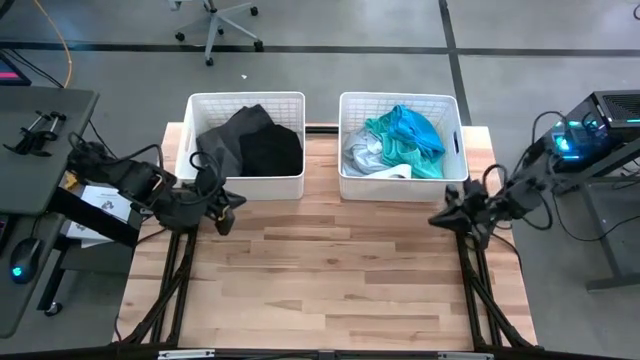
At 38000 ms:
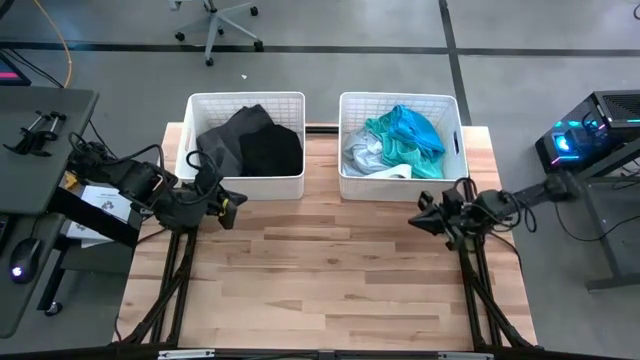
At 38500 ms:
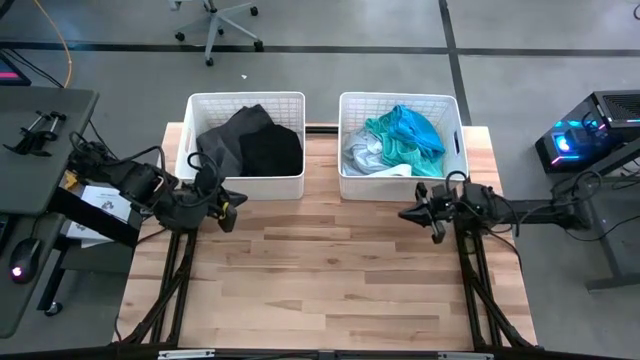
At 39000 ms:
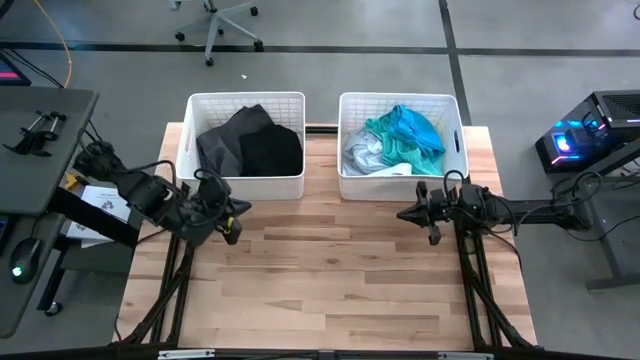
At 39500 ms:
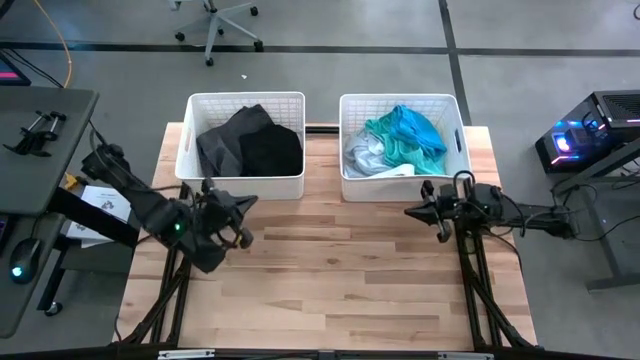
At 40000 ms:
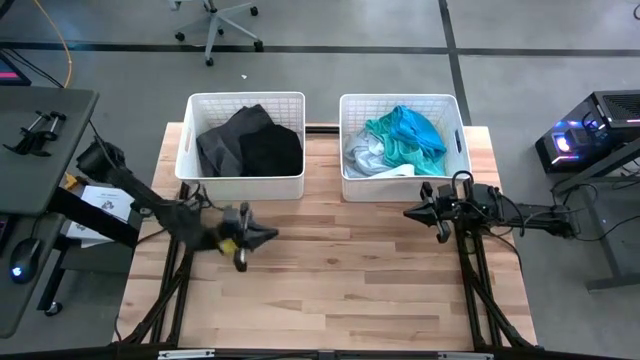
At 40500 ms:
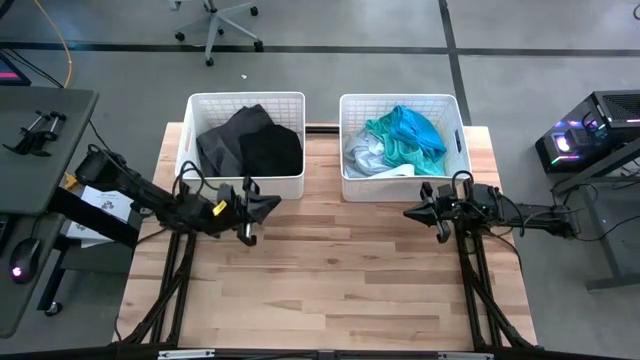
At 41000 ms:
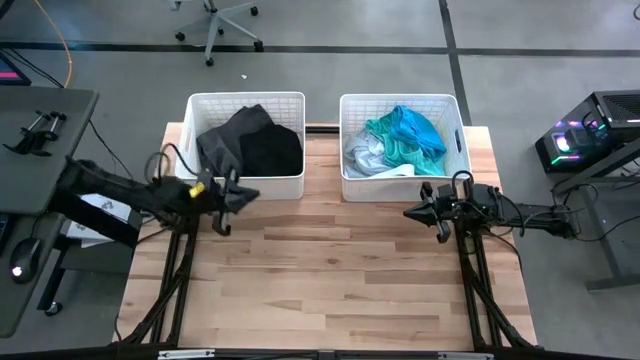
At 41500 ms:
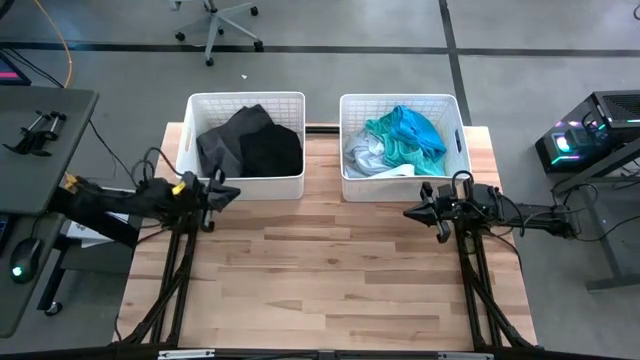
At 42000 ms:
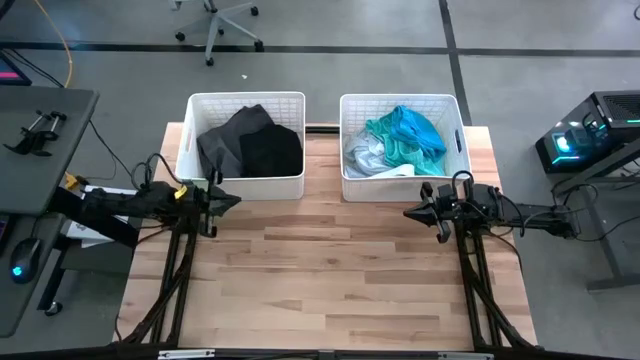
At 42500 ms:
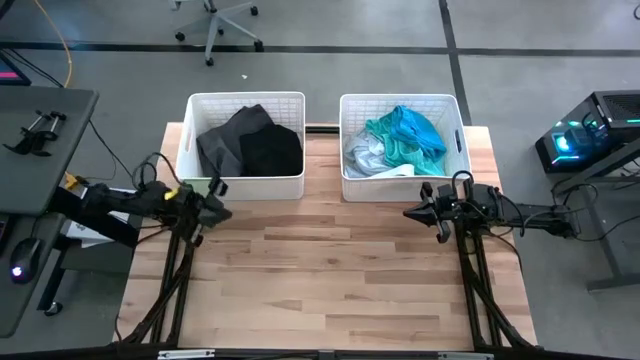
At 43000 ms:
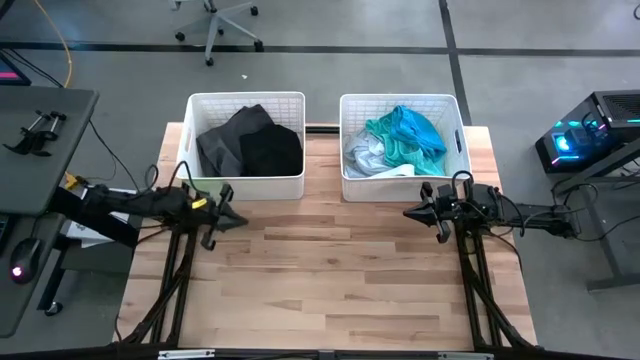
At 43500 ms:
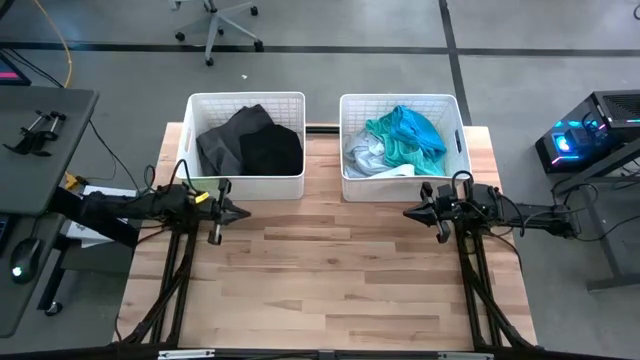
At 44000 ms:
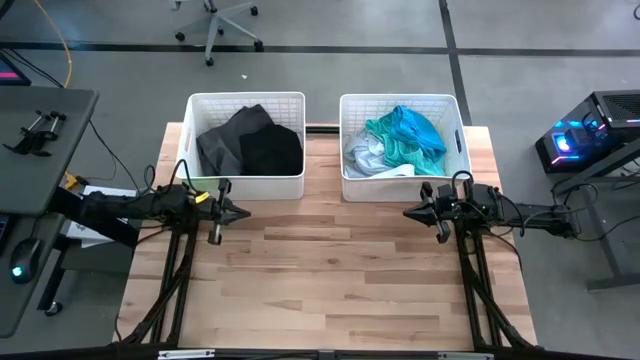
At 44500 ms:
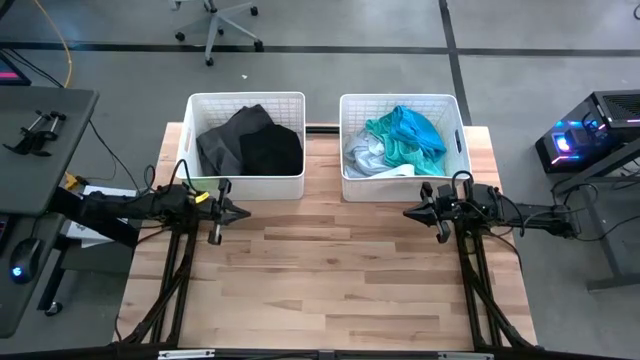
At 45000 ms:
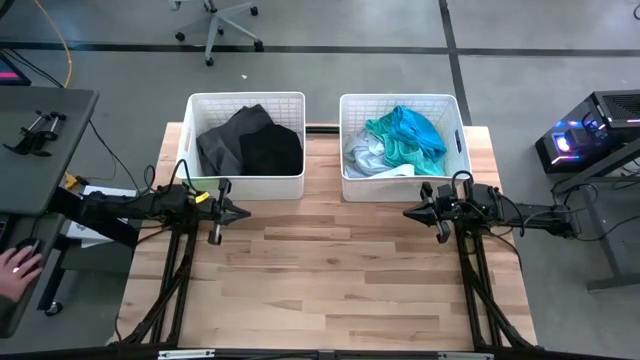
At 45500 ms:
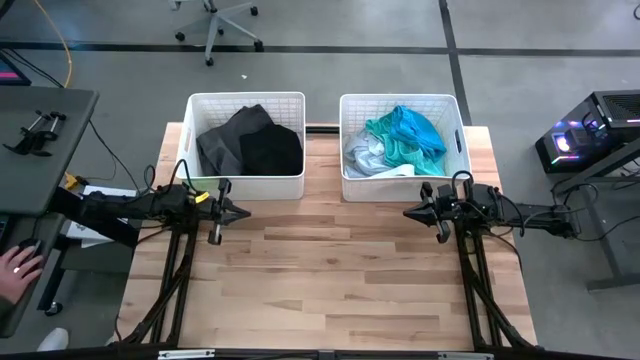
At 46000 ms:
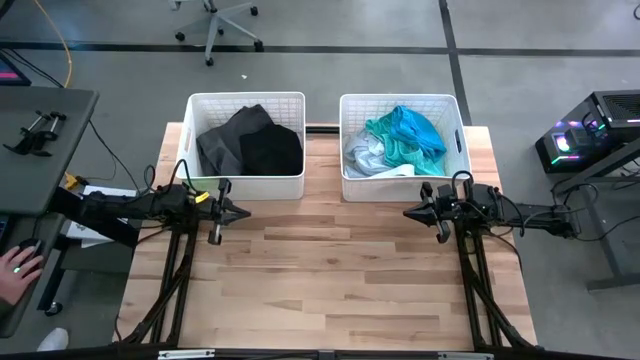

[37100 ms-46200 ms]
Task: Sort clothes
Return to Home Position

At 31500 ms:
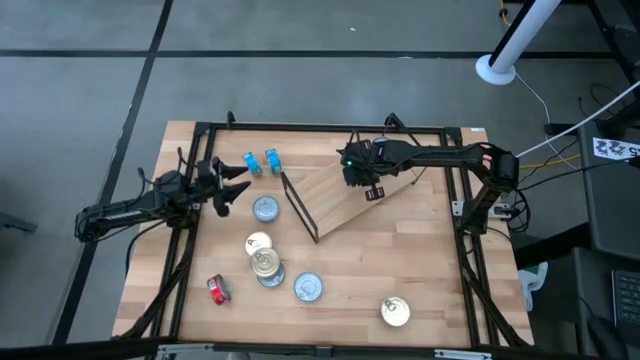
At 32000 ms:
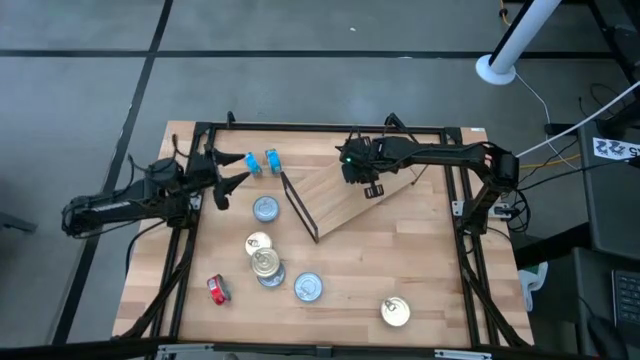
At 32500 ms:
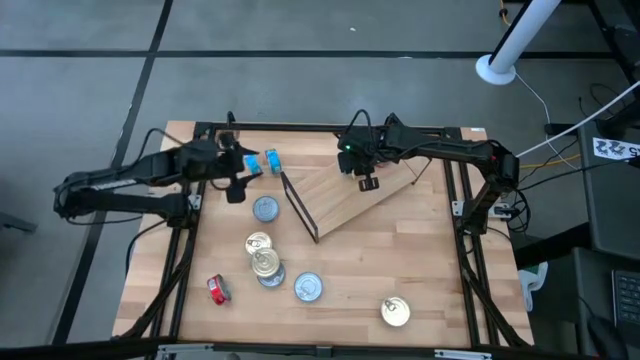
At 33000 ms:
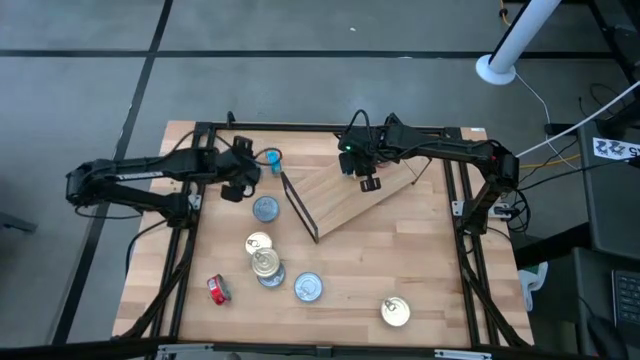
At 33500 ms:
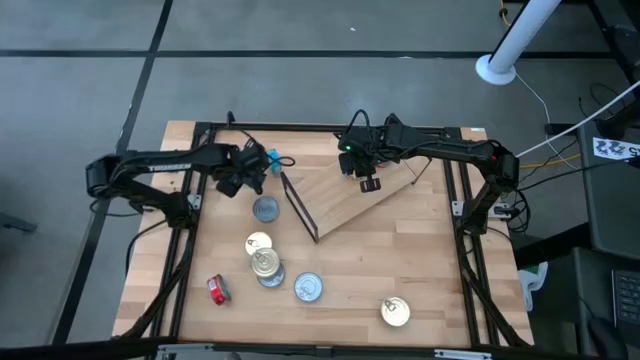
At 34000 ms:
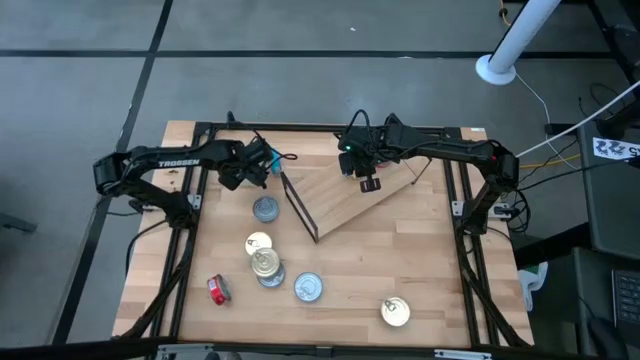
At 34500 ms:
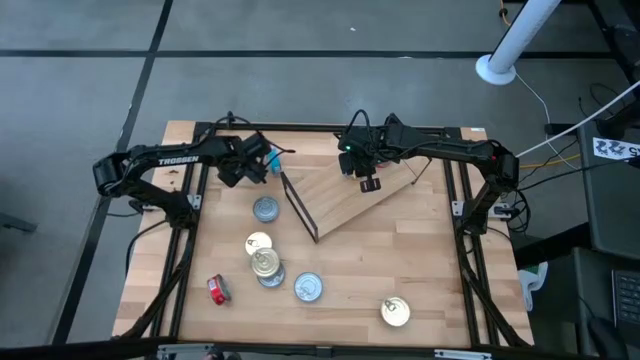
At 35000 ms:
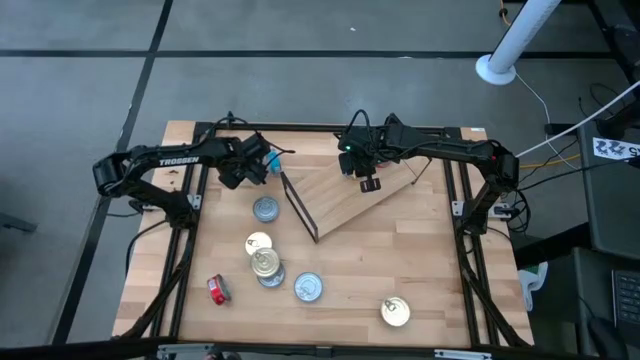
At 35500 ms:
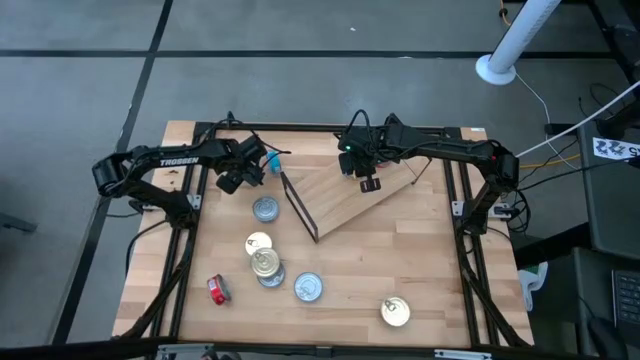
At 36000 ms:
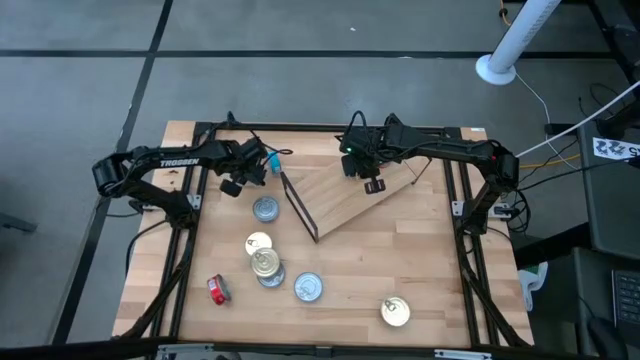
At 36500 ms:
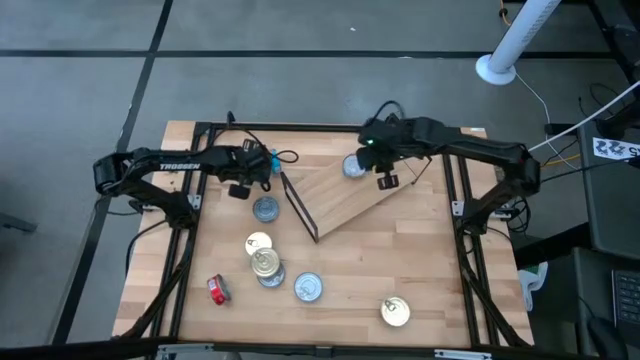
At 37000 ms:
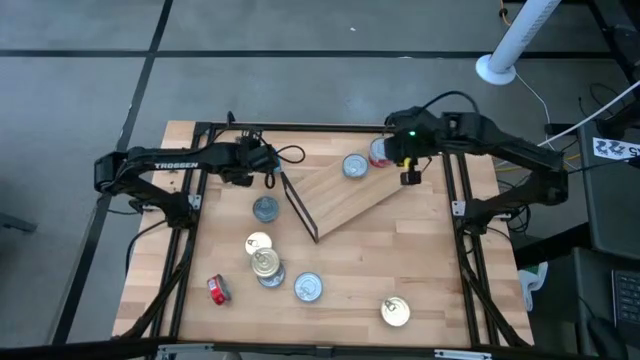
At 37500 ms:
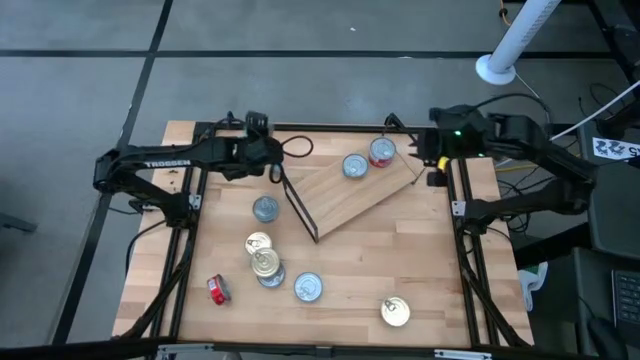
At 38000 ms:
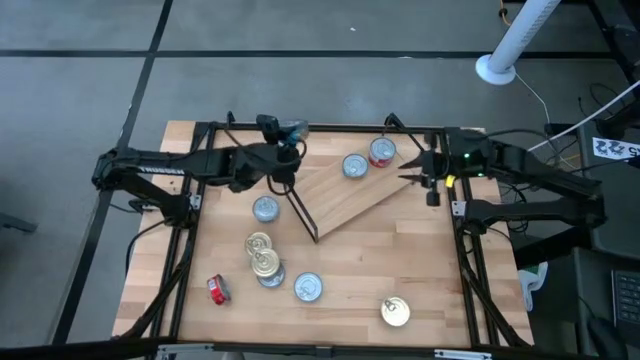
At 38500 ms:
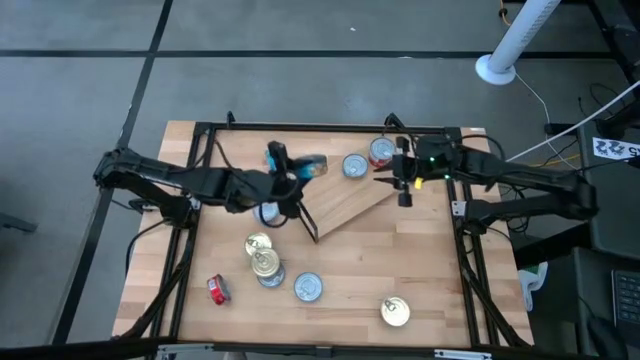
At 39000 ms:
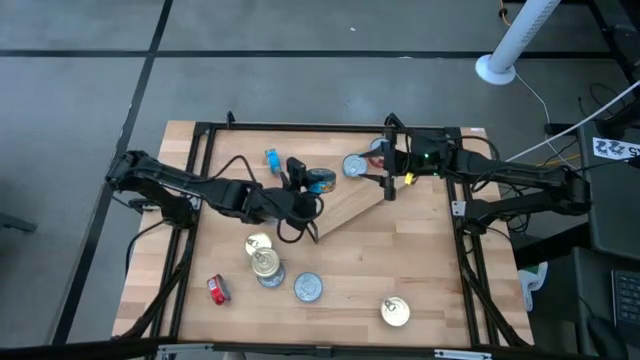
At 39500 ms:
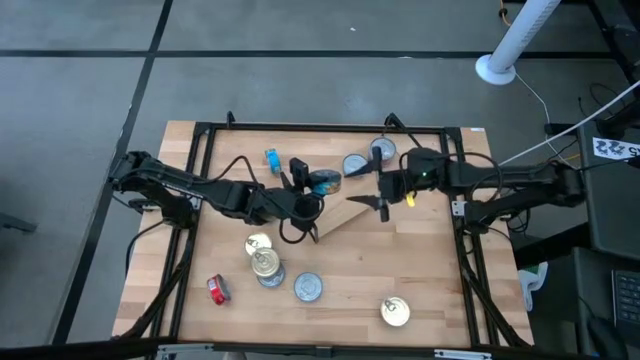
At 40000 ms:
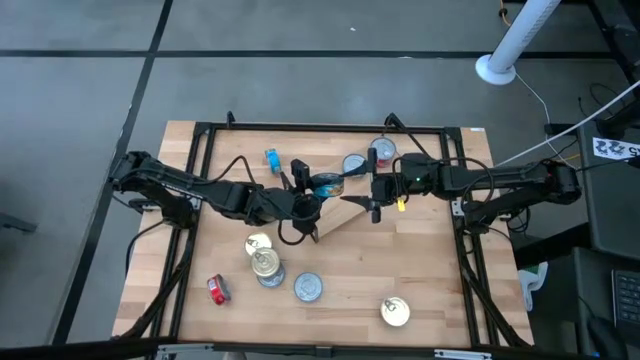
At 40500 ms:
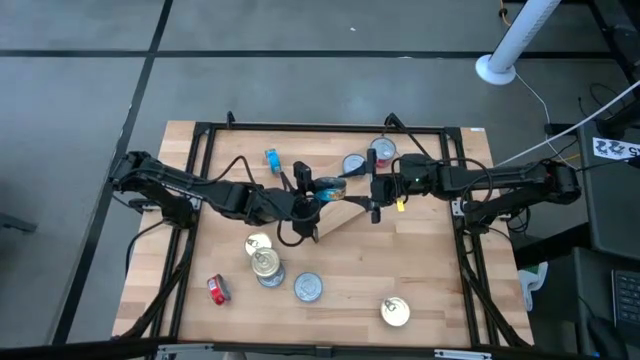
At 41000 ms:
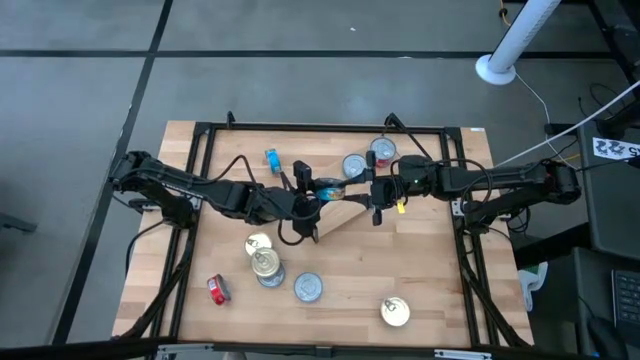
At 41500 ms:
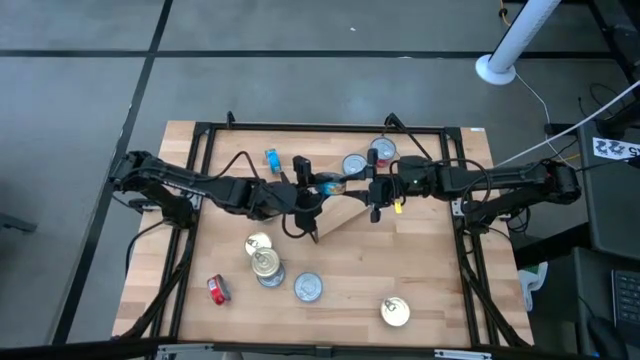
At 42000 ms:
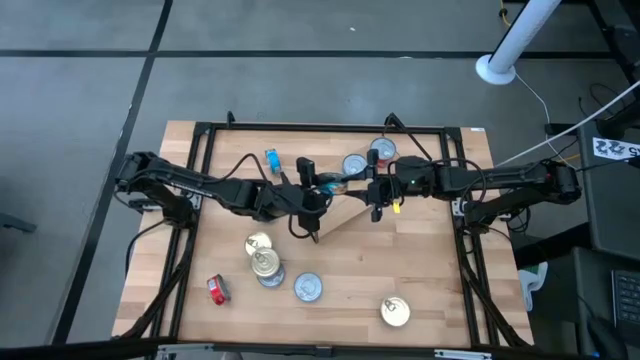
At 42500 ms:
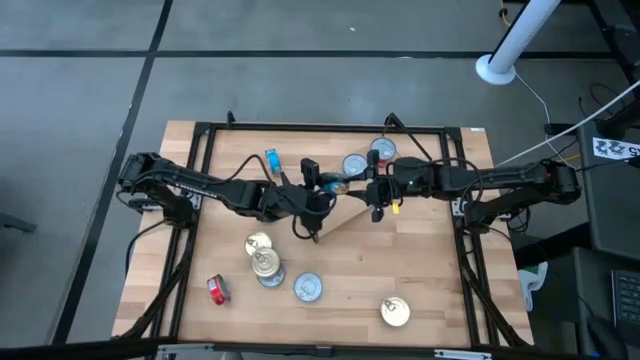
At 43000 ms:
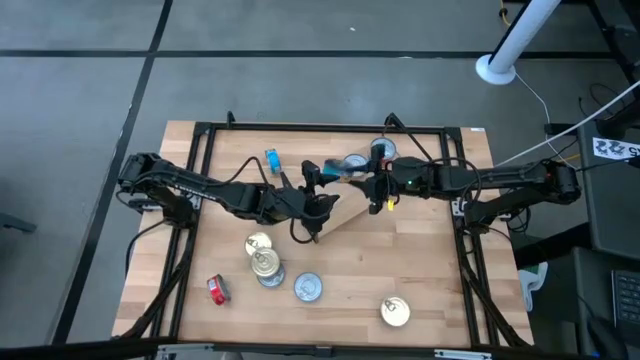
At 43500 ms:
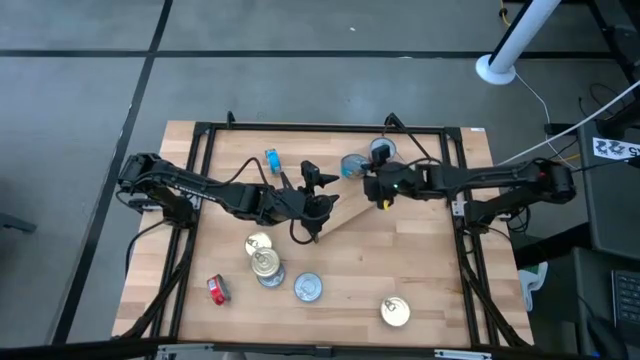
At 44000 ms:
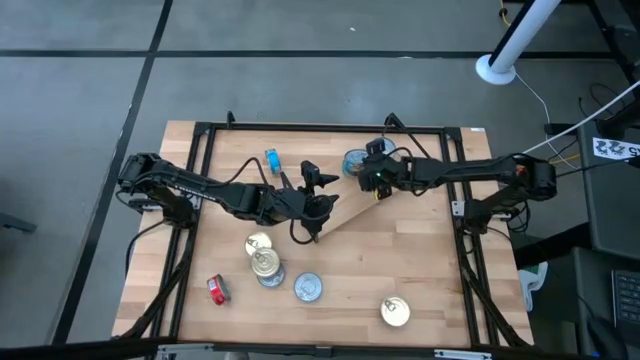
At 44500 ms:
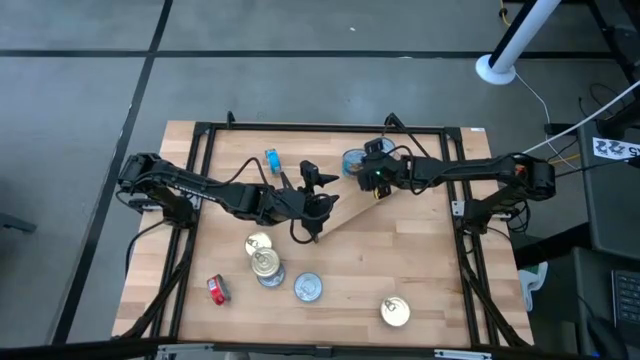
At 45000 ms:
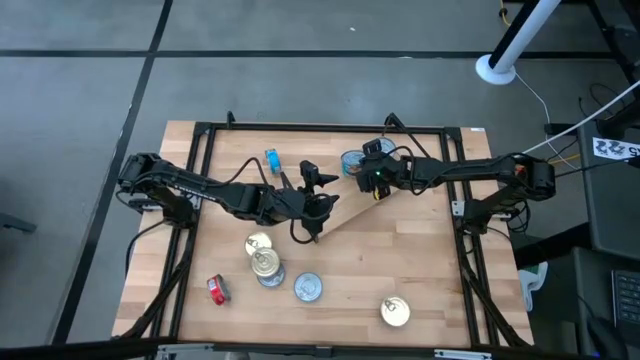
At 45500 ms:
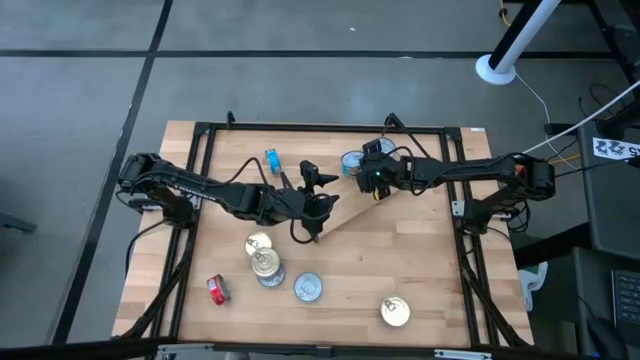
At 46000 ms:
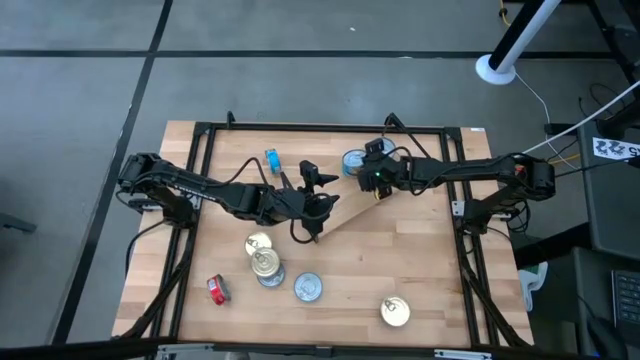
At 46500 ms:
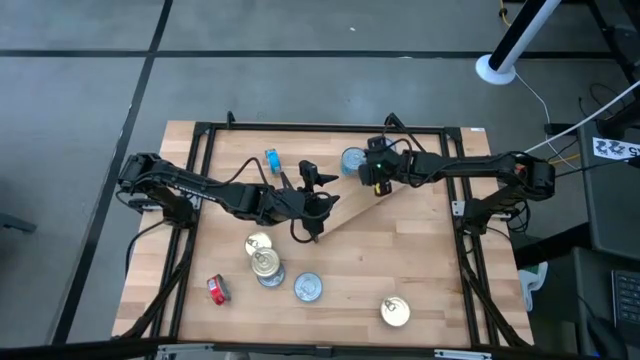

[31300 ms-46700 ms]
Task: Stack canned seafood by type on shelf
Stack the light blue tuna can on top of the light blue tuna can on the shelf
